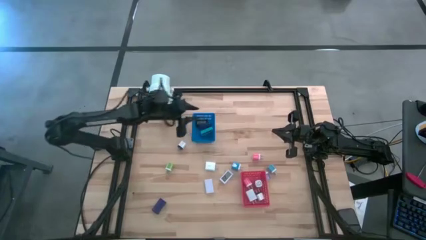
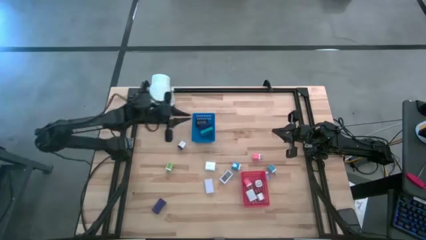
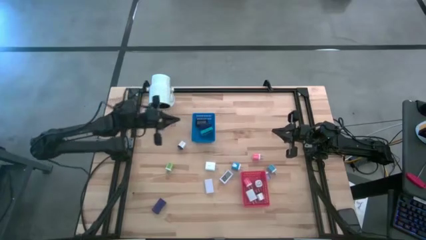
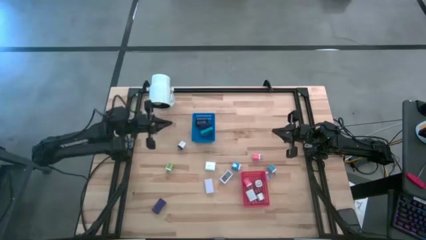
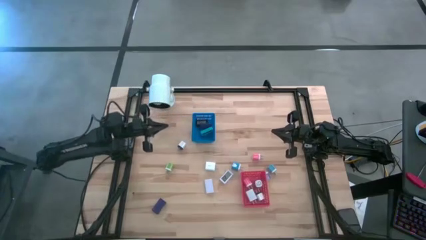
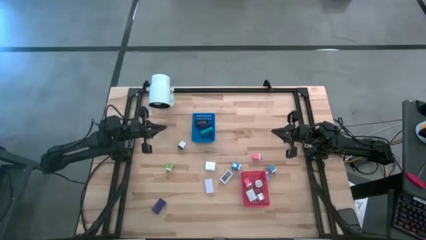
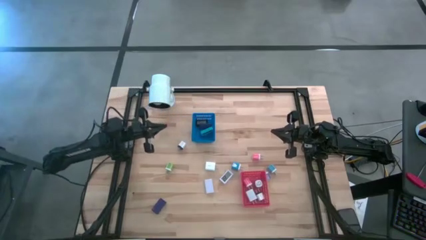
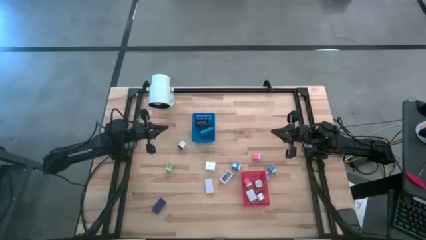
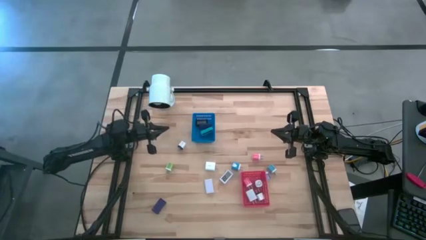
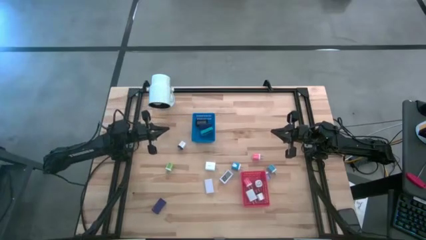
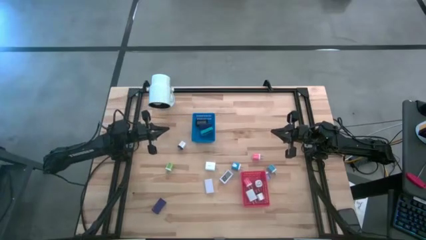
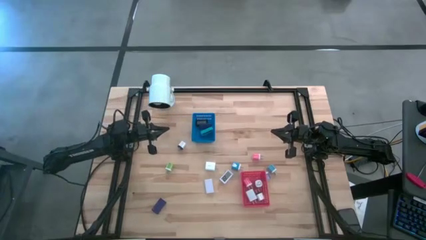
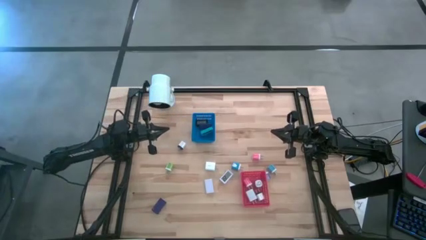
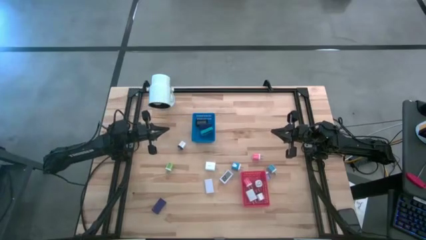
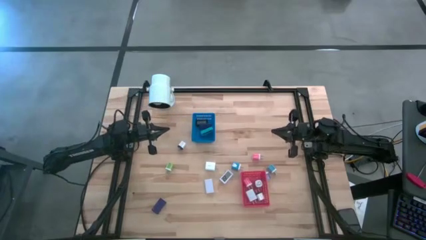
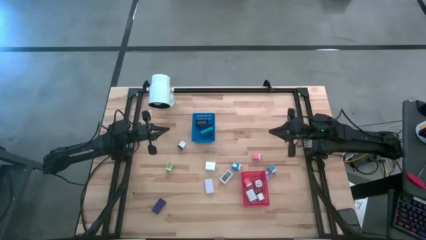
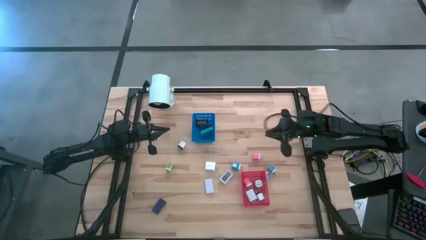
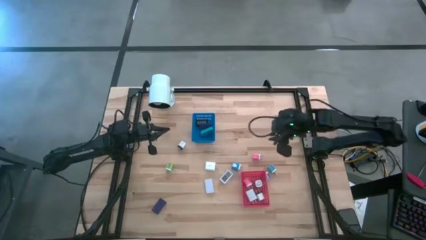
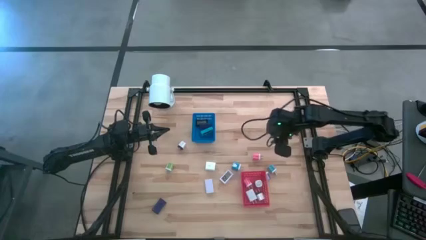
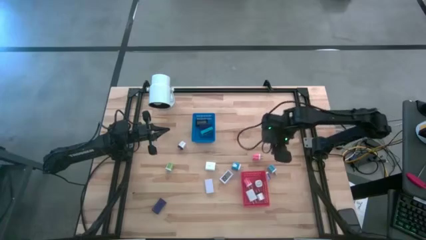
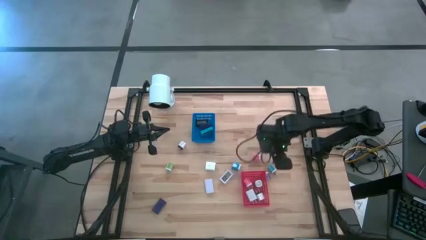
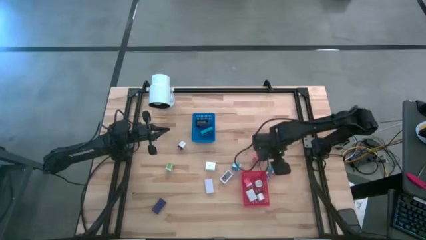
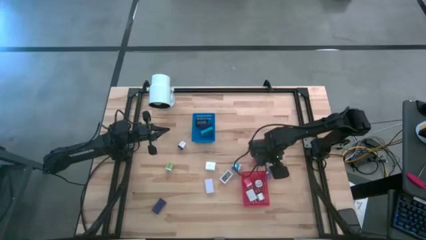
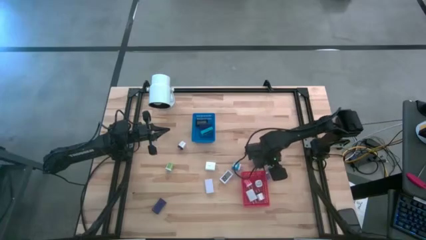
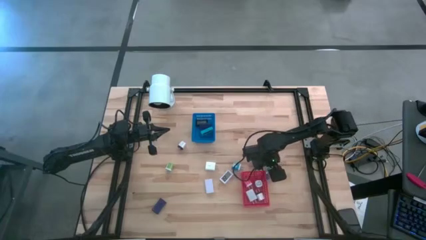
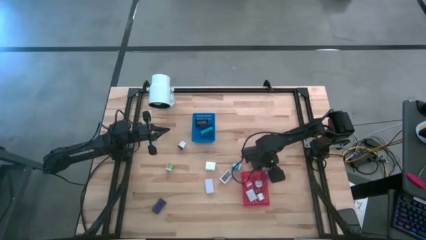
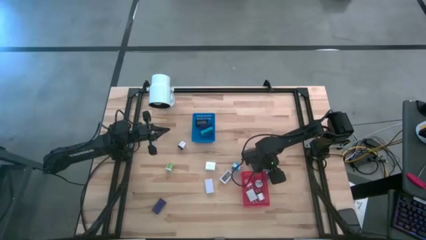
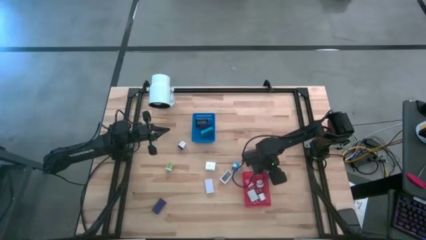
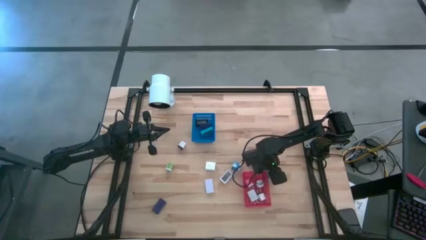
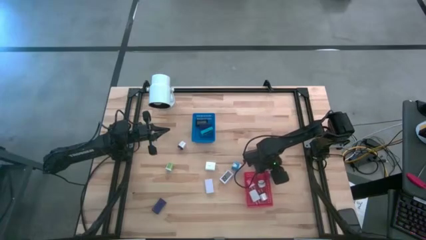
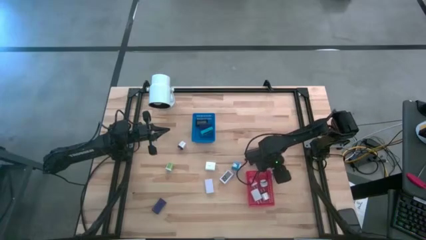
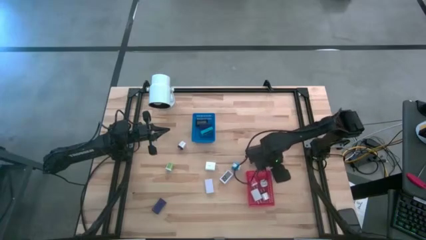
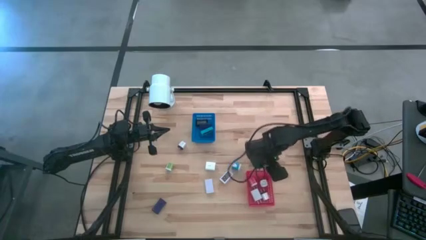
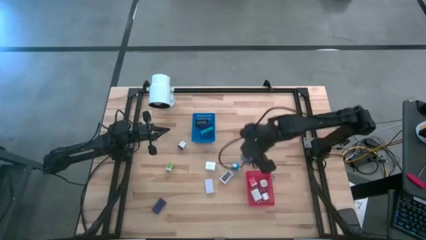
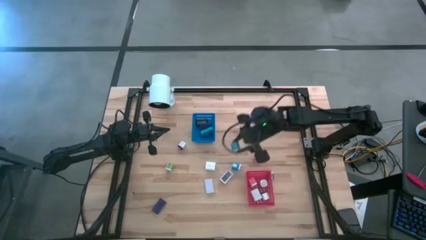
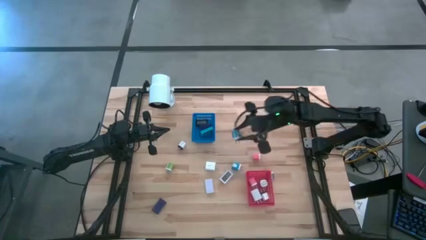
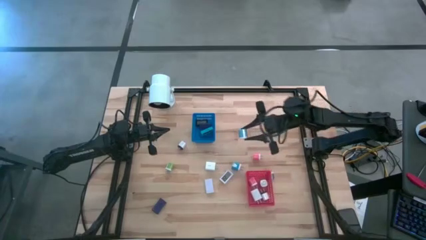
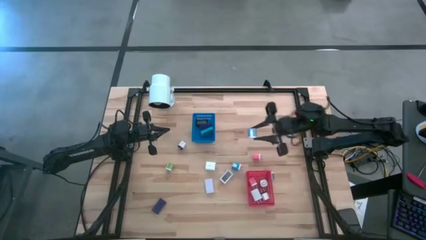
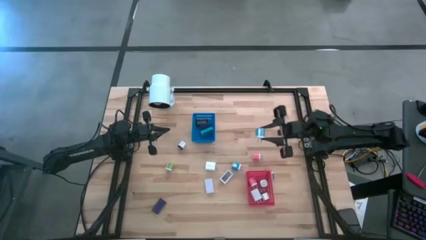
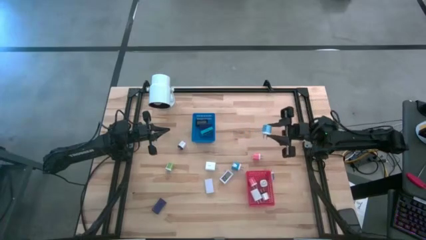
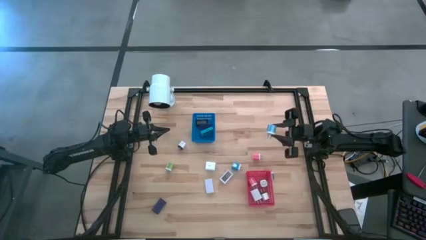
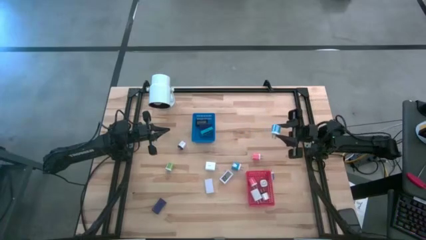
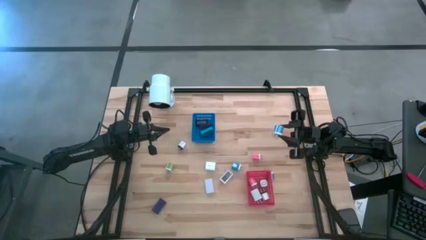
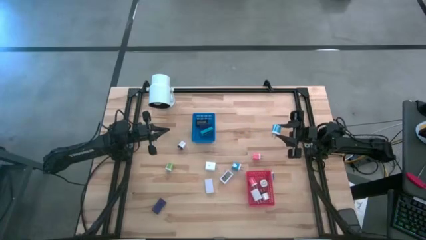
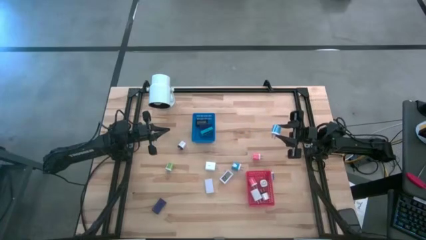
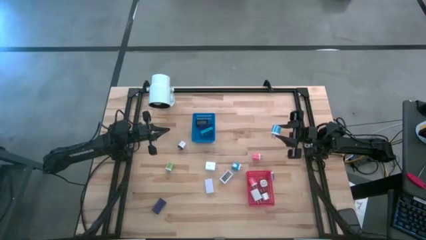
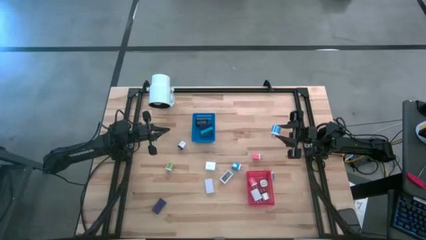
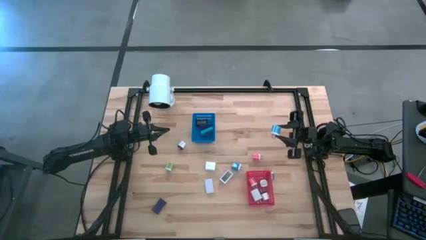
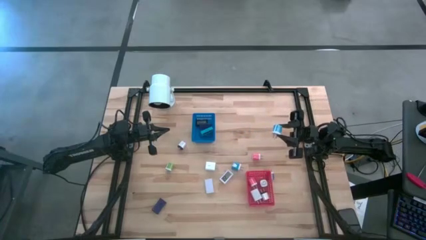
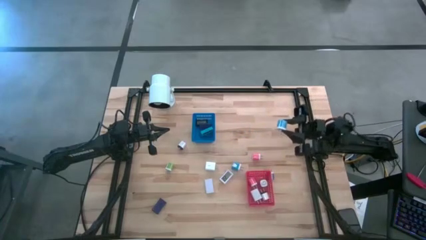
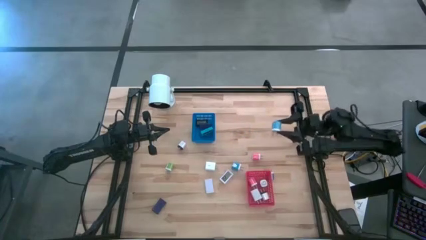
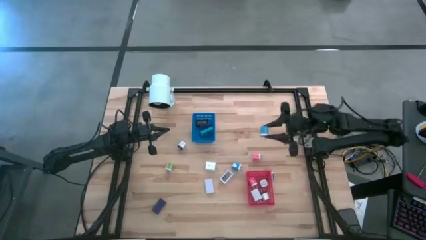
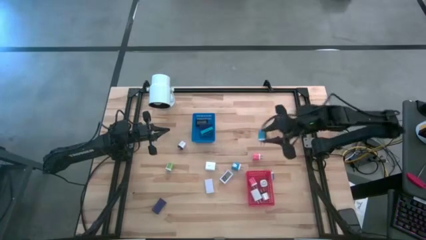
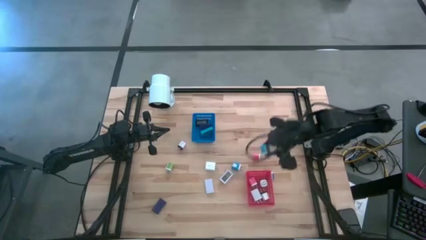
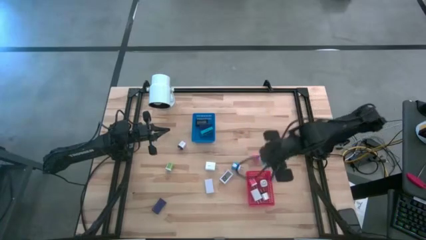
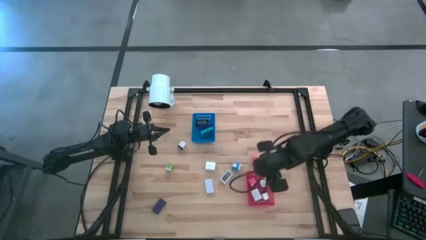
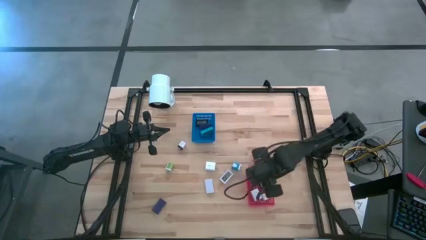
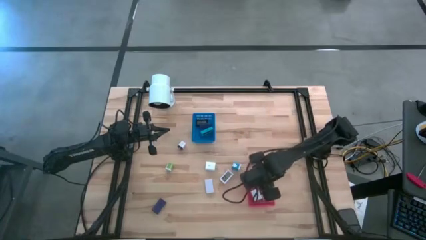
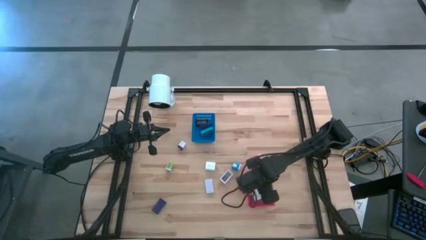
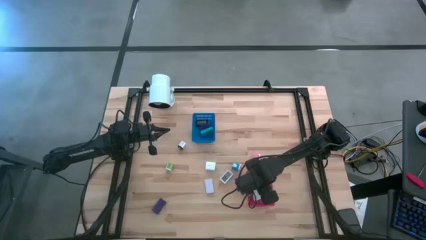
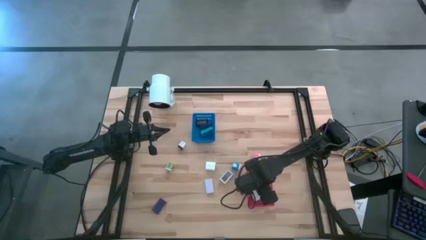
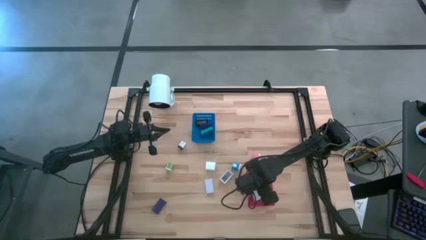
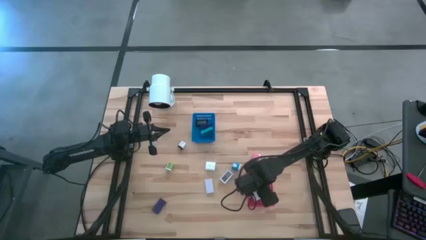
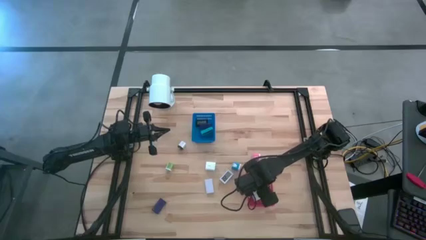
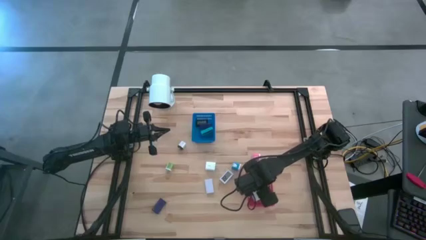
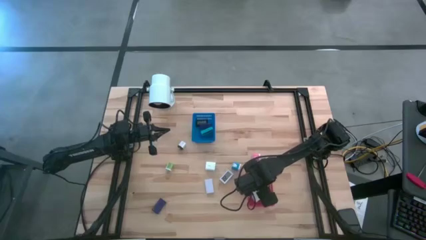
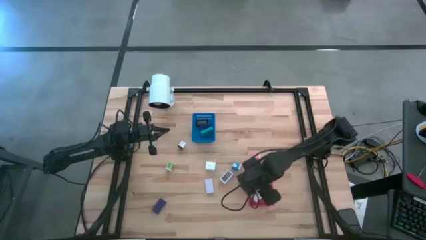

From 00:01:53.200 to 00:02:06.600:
Task: Pick & Place Office items
Put the right blue charger adapter into the red bin

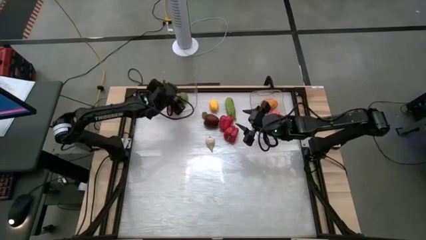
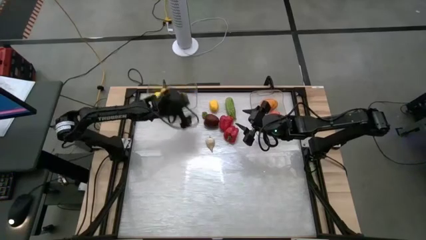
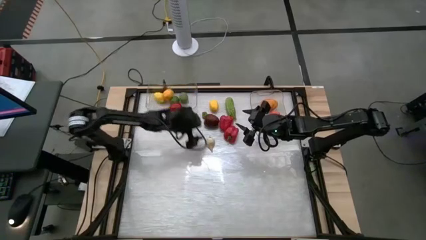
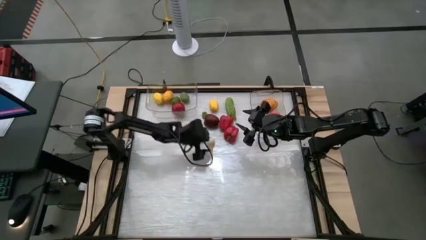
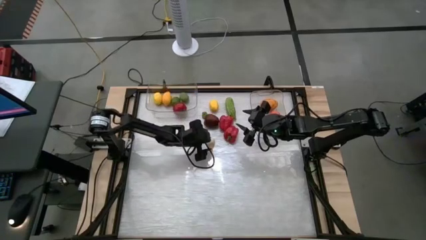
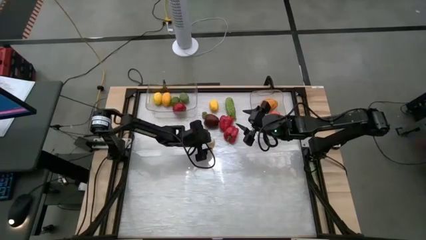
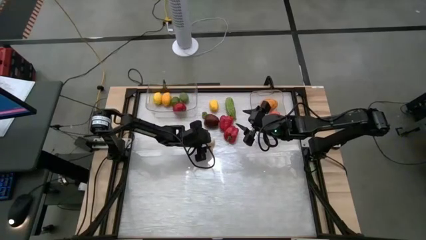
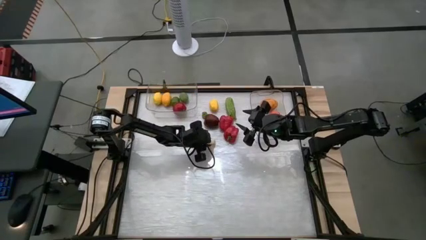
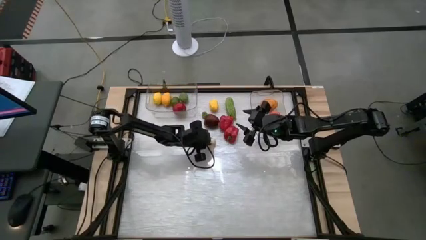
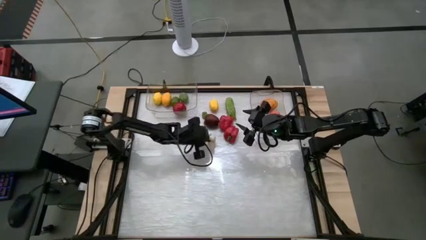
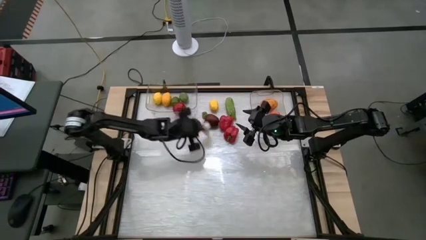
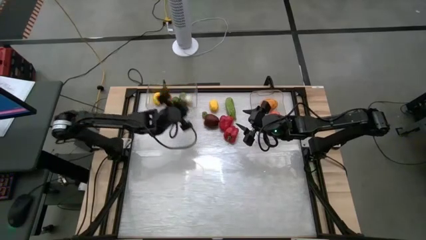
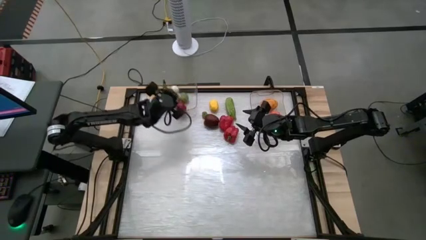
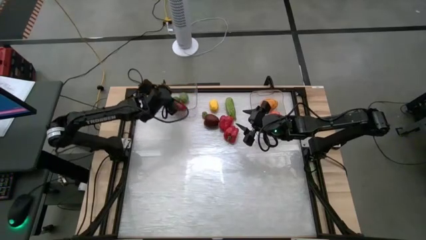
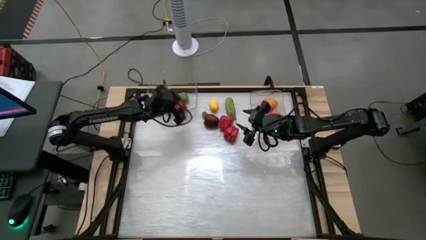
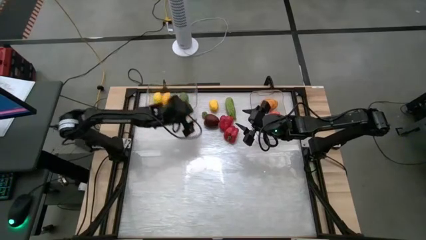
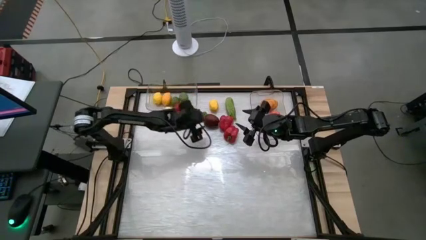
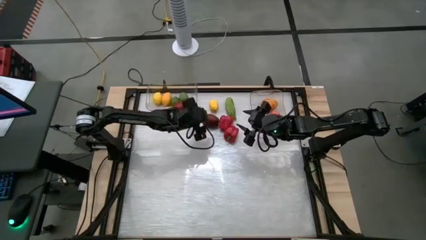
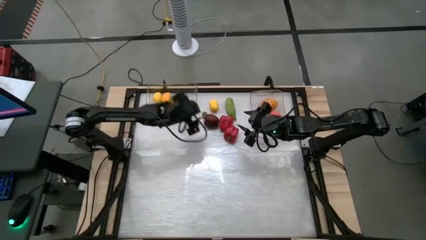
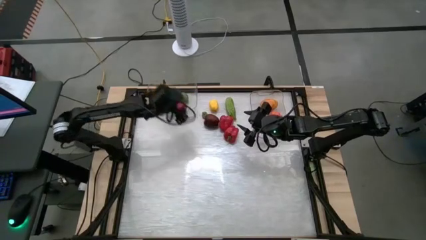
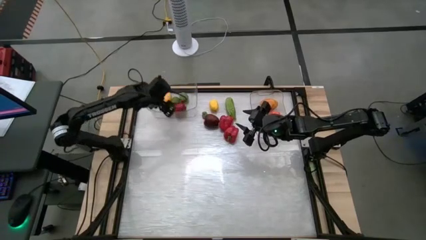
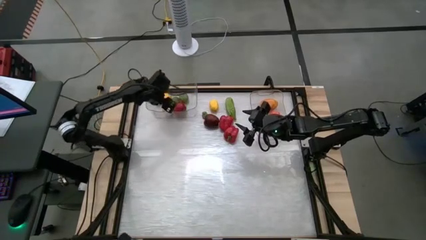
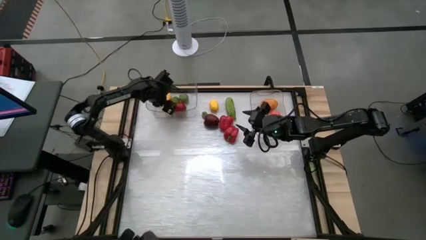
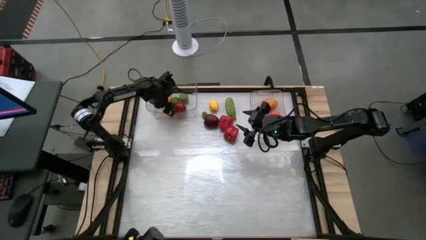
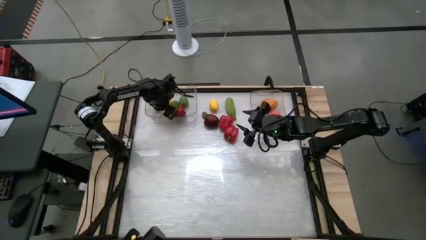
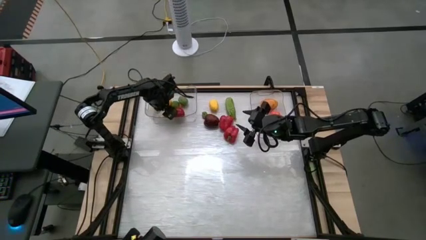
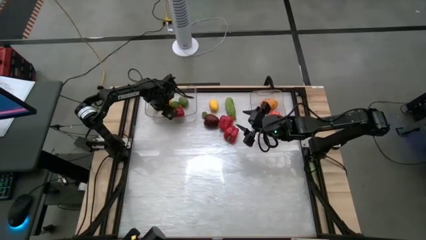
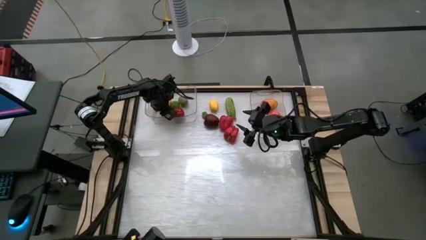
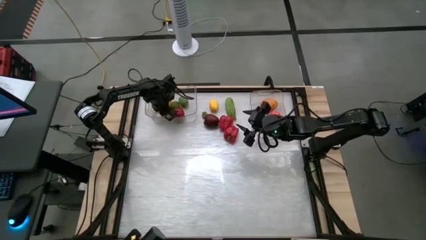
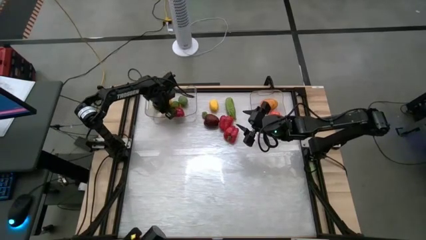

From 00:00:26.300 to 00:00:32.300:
Task: Sort produce into baskets
Put the white garlic into the right transparent bin
